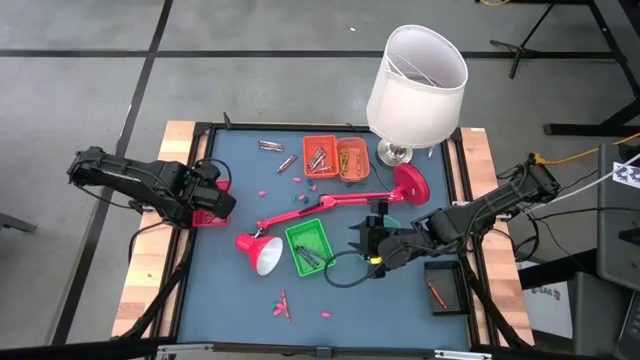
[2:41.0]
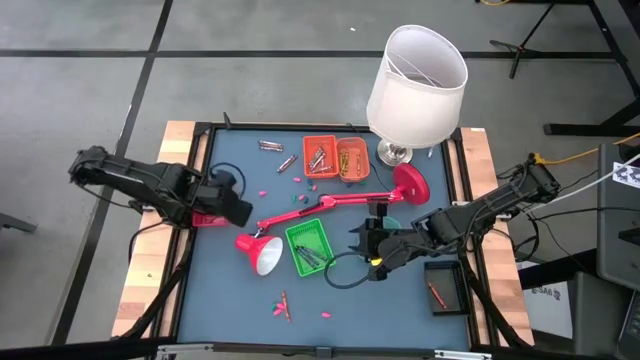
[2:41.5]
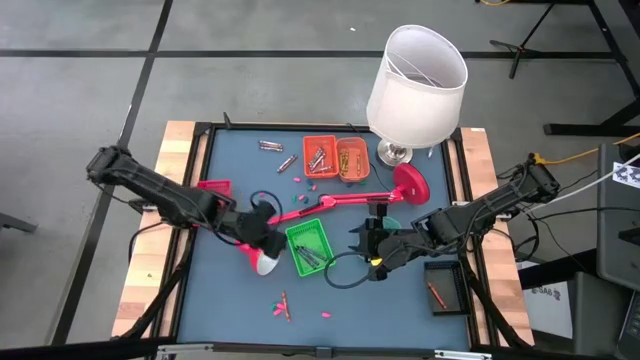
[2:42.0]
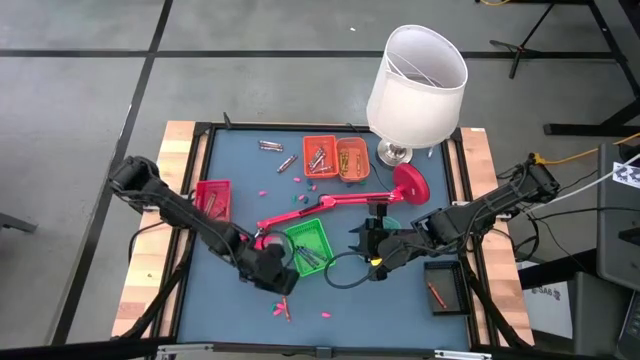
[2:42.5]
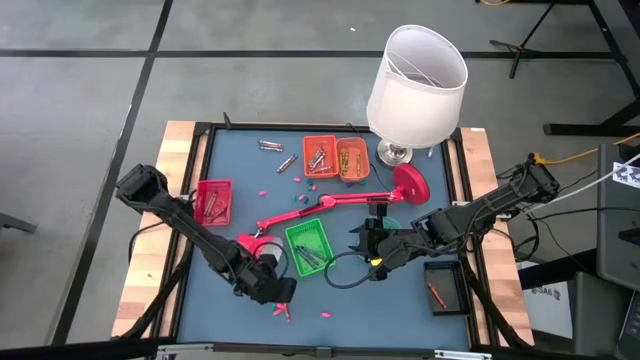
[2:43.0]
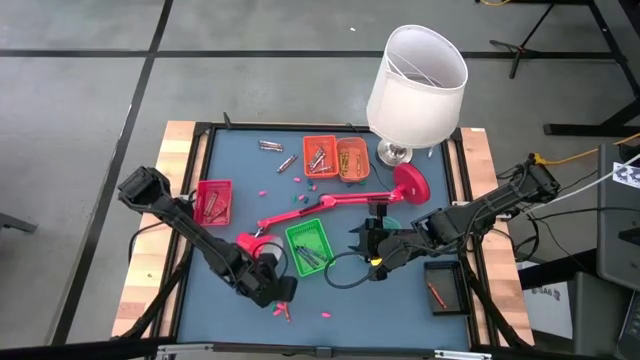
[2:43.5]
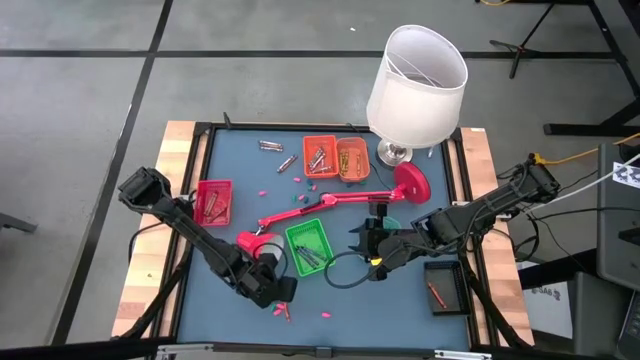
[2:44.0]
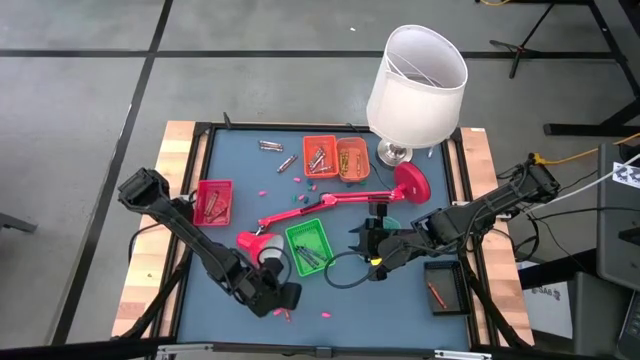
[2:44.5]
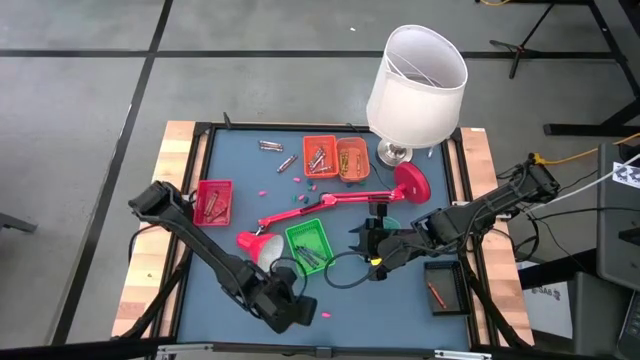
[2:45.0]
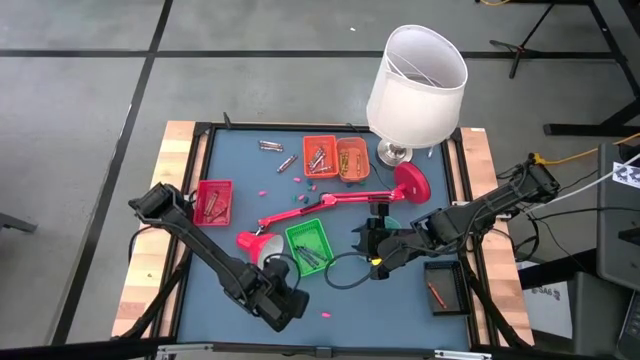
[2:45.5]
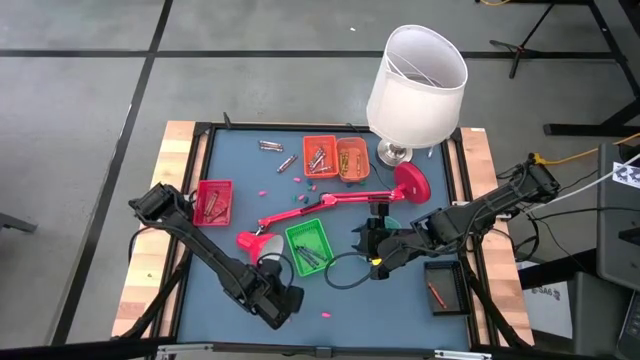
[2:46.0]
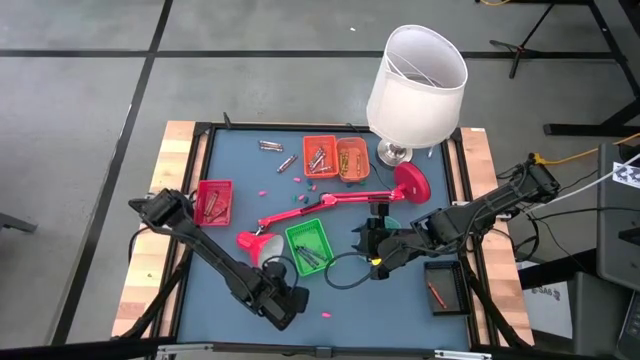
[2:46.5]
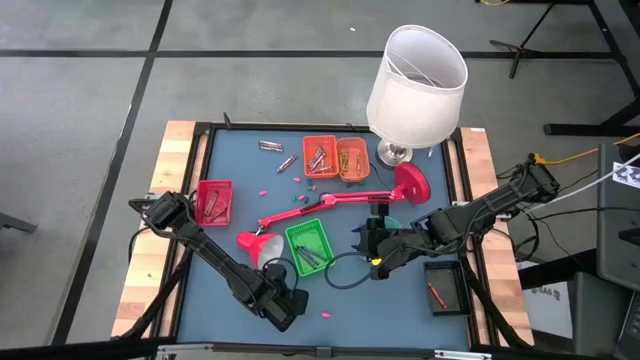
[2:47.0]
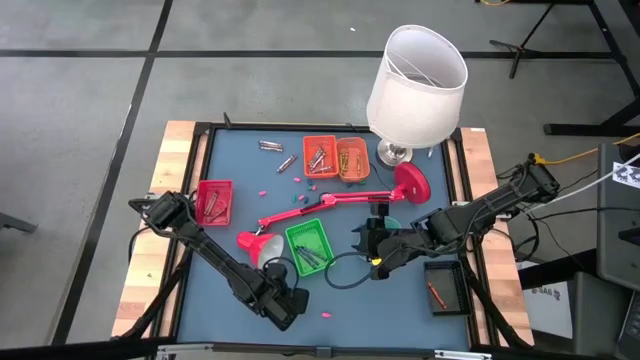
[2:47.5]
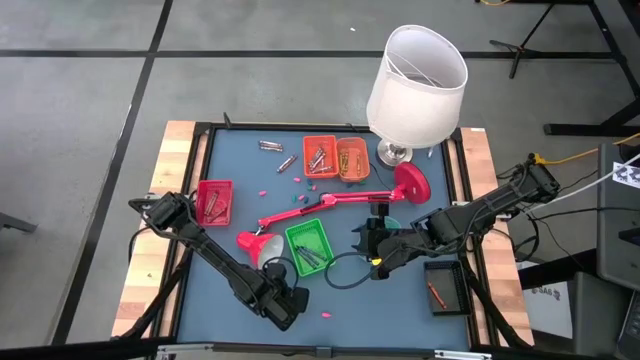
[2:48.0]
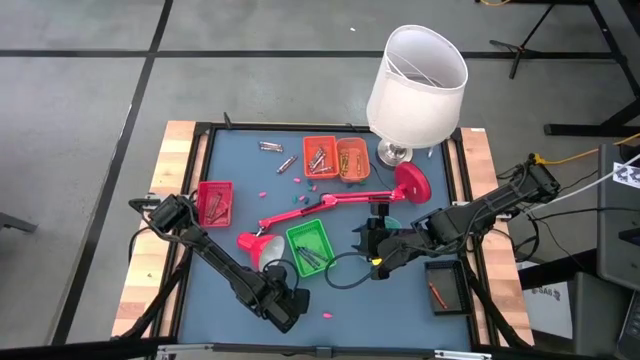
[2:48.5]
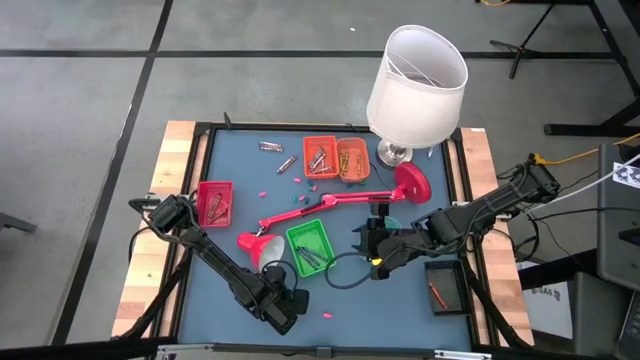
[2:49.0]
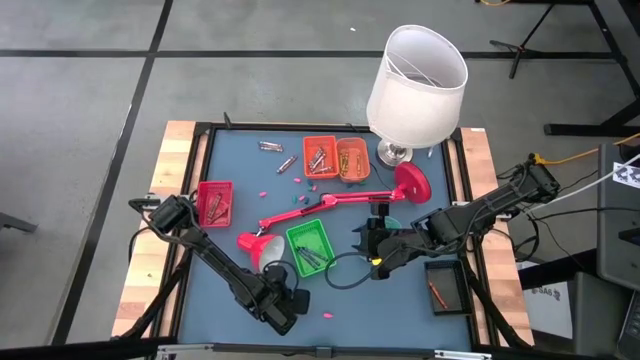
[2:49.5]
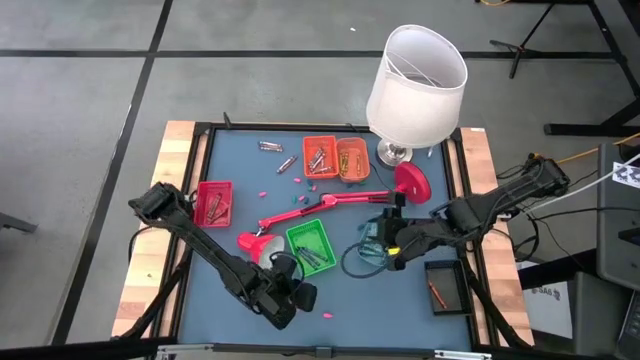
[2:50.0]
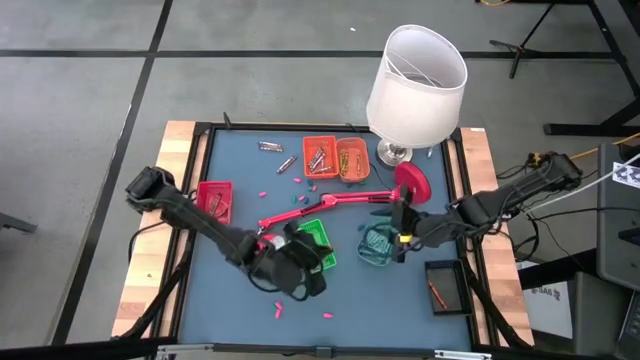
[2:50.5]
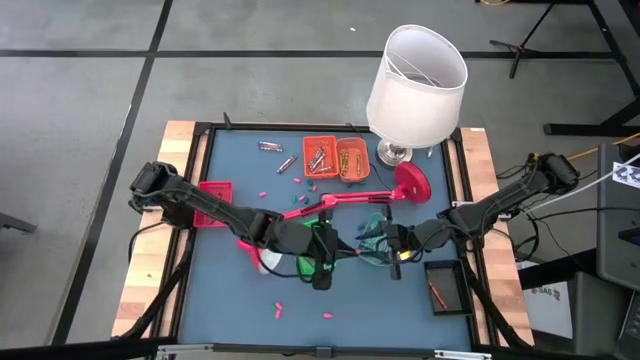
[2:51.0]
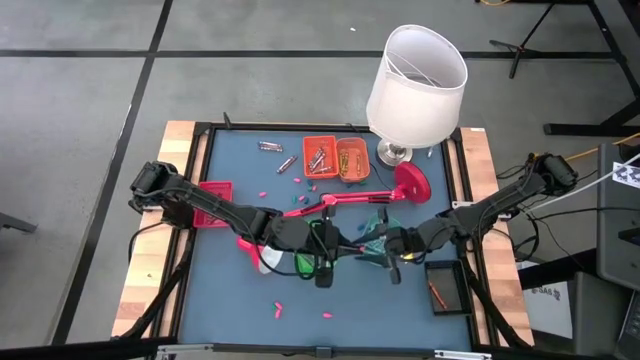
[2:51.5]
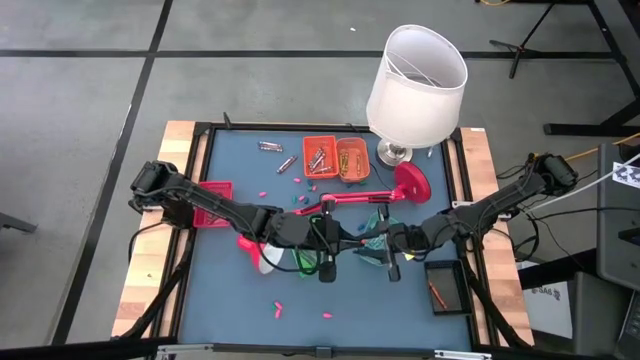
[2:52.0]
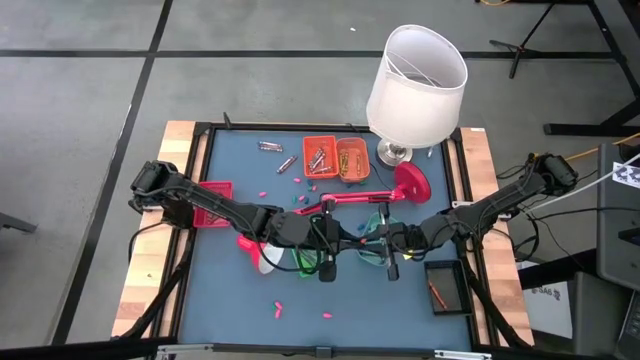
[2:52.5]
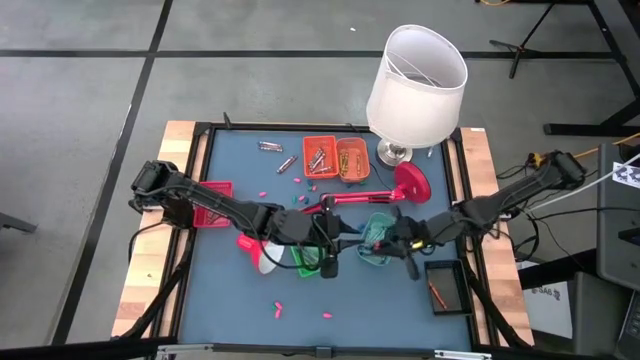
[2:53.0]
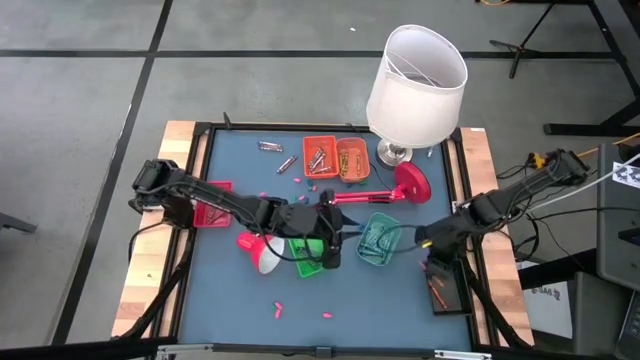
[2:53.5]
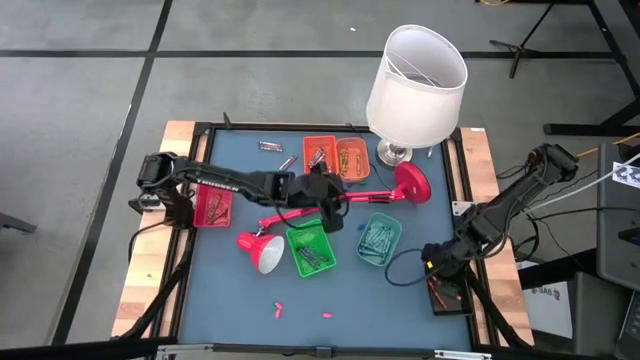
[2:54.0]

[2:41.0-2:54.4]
Task: Sort crayons
Put the orange crayon into the black bin

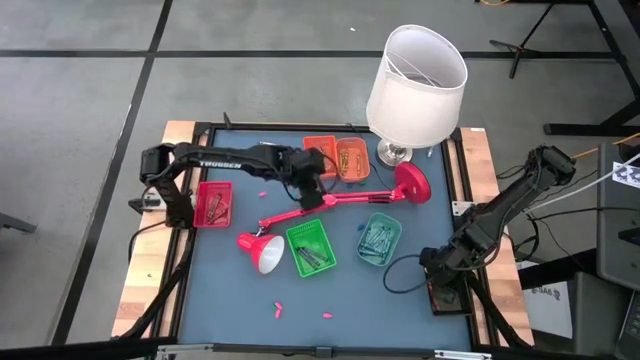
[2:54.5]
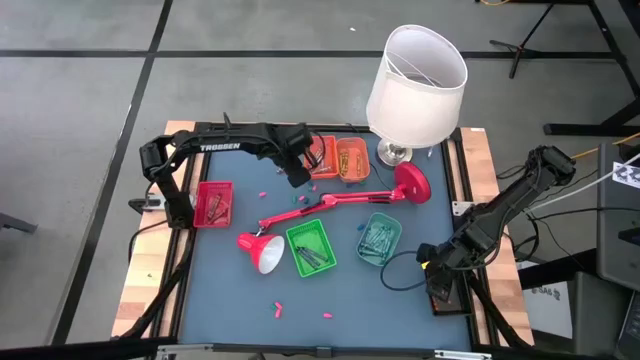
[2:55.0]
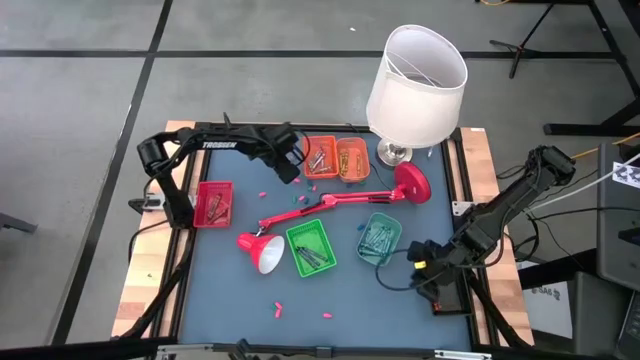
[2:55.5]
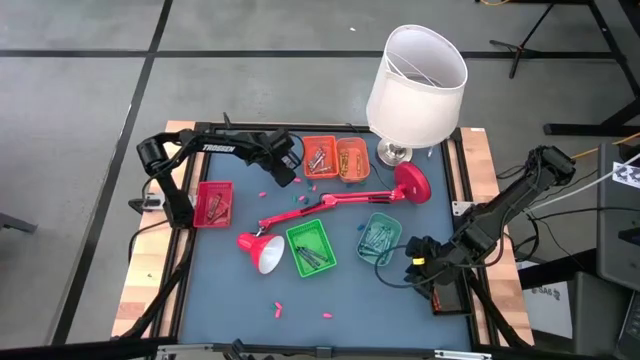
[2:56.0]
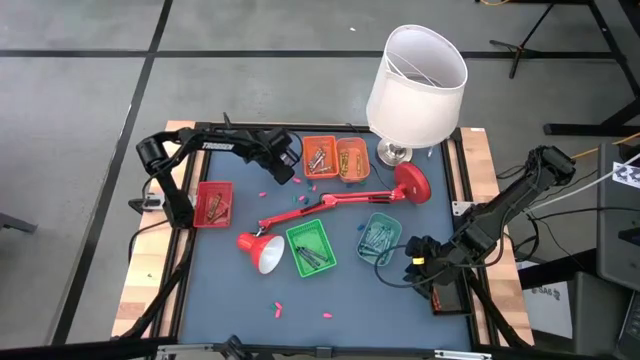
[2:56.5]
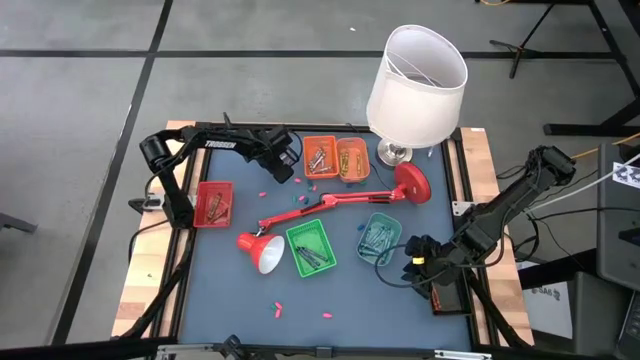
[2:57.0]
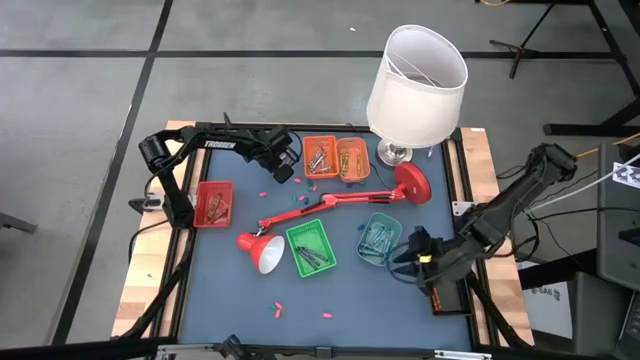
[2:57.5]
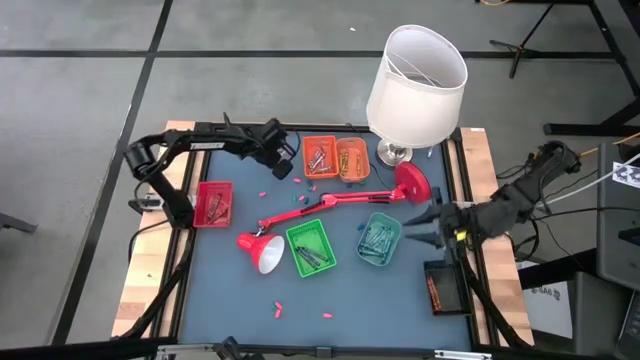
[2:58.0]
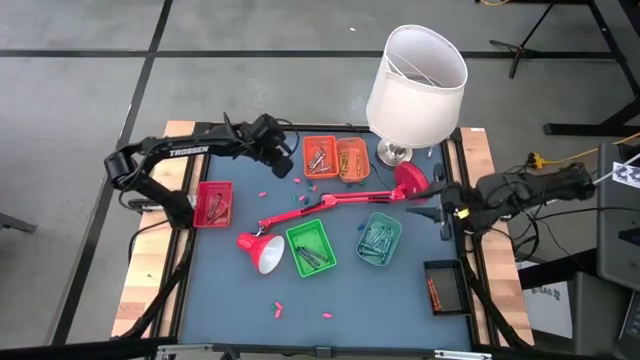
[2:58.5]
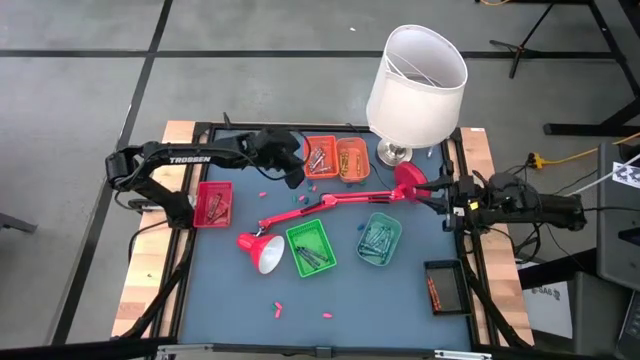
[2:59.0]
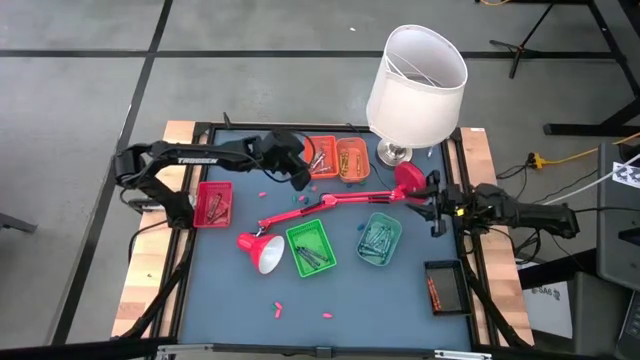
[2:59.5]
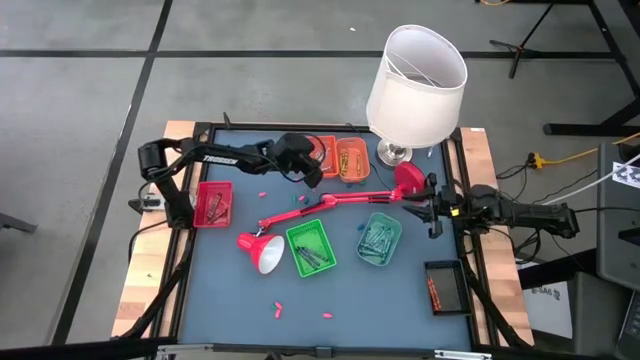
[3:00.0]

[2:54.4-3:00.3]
Put the gray crayon into the orange bin

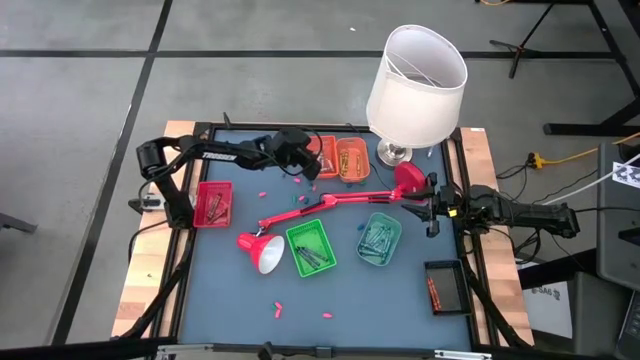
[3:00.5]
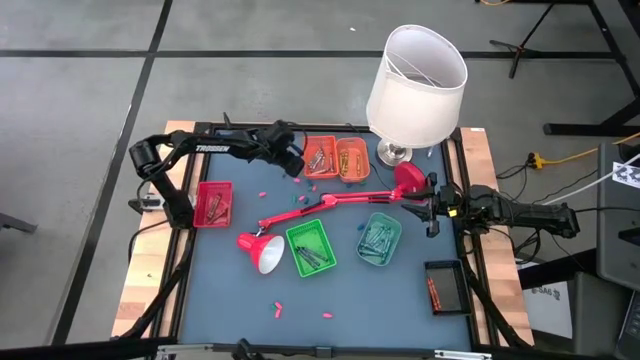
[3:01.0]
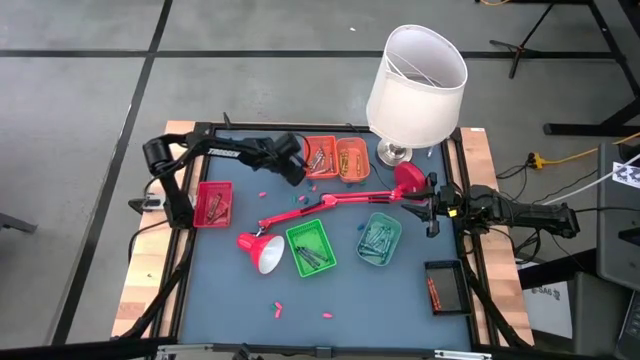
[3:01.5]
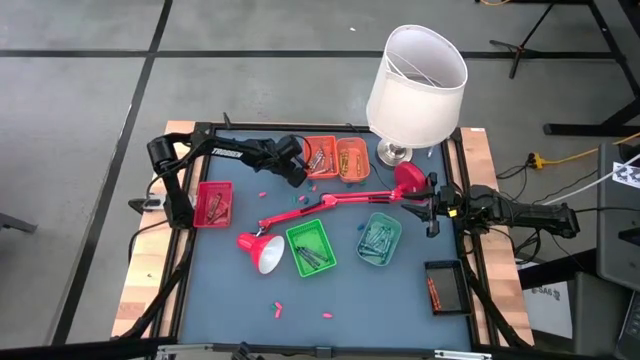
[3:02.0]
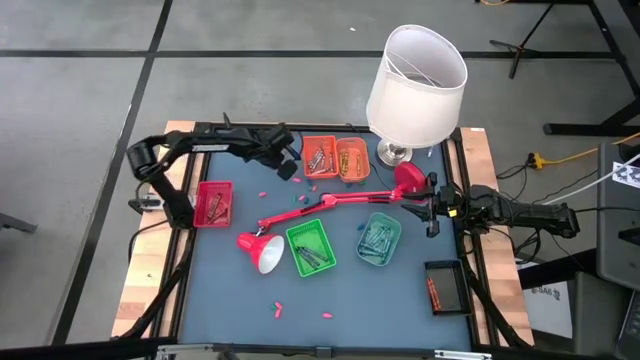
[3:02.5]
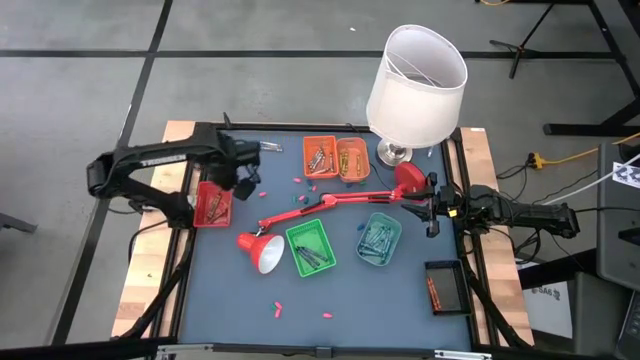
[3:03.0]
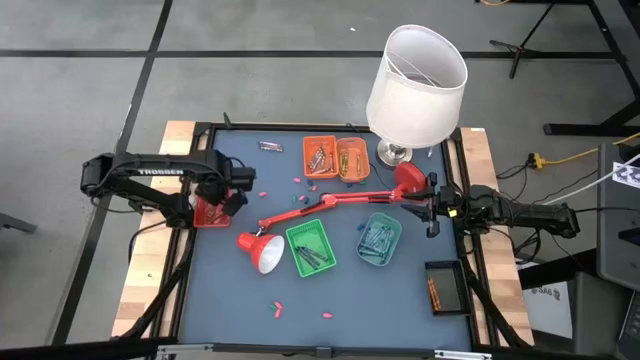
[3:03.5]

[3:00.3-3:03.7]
Put the brown crayon into the red bin
